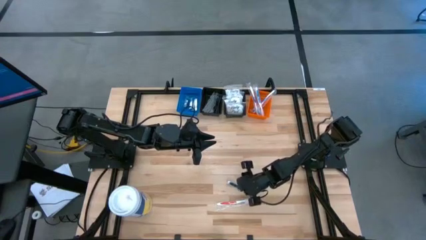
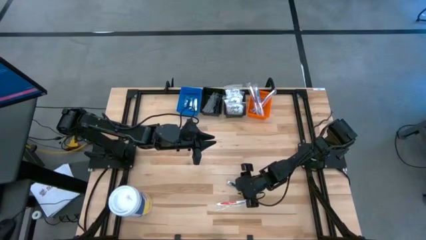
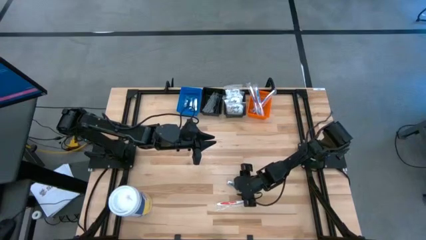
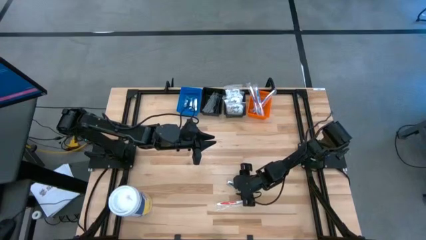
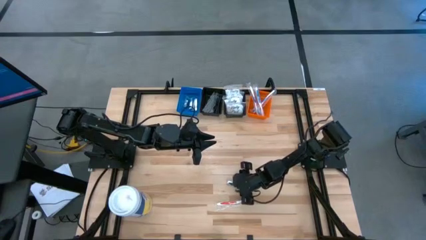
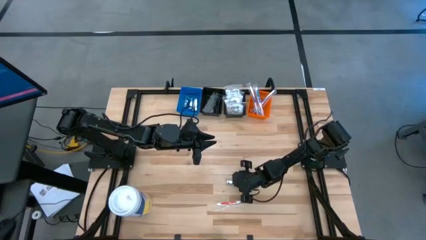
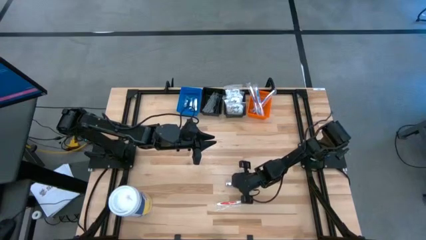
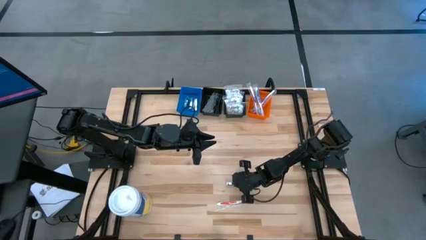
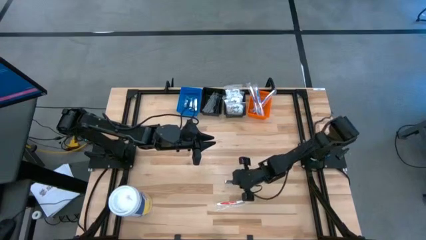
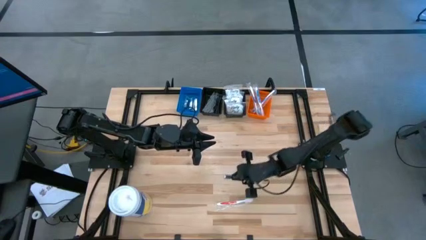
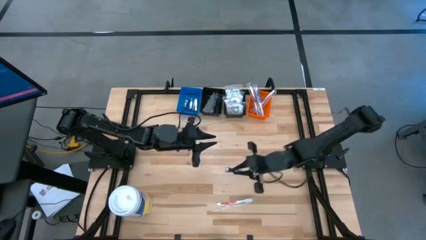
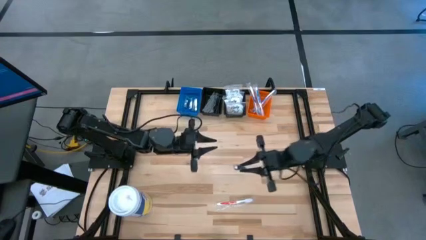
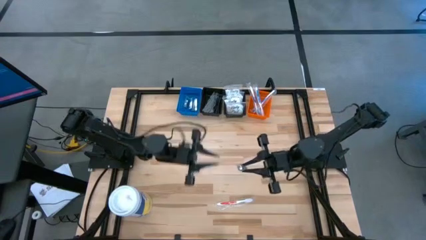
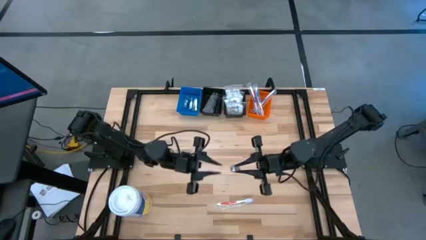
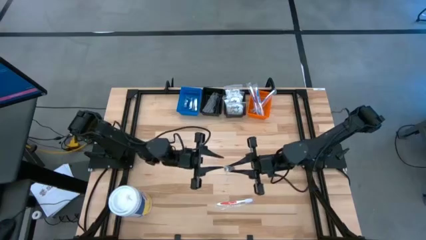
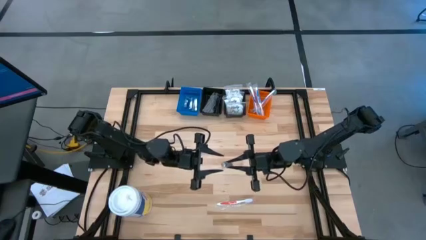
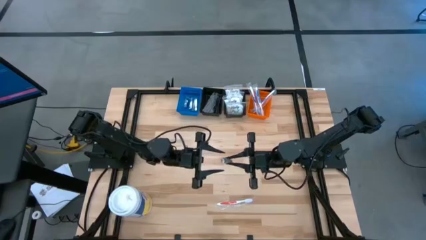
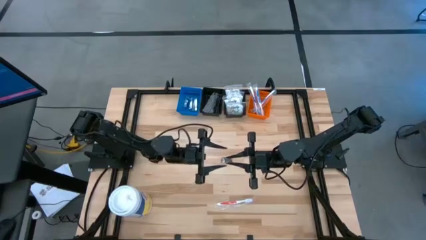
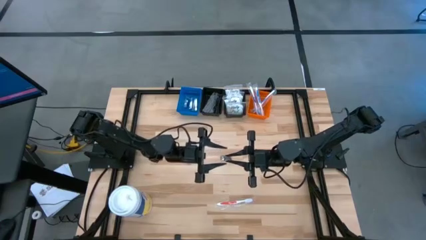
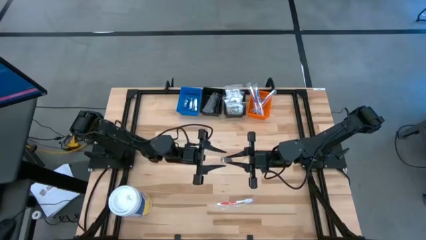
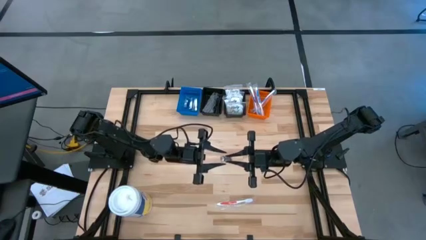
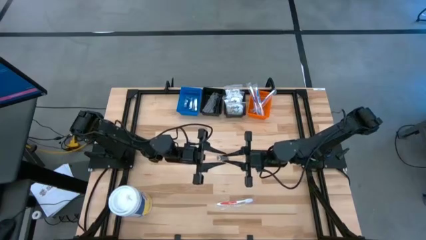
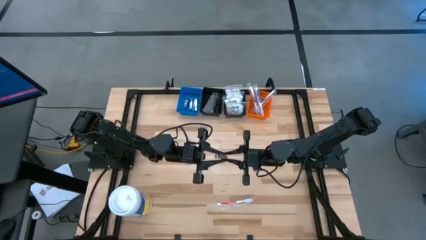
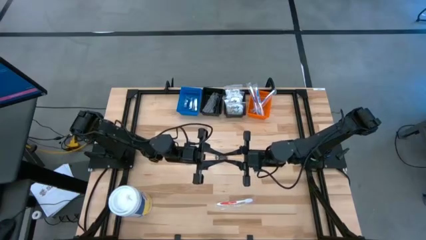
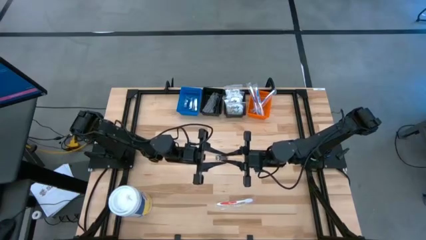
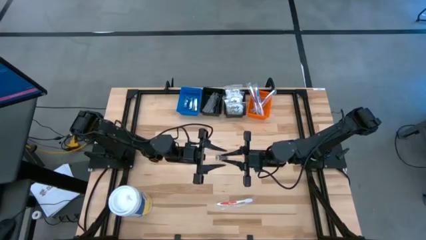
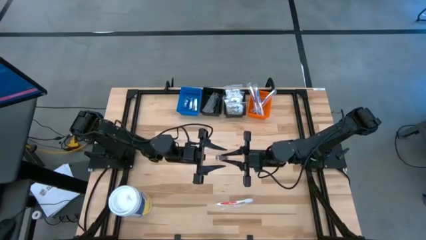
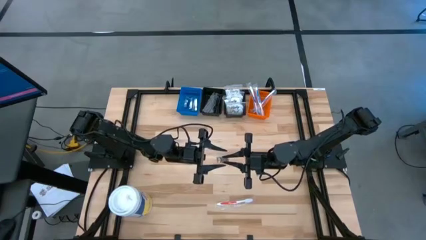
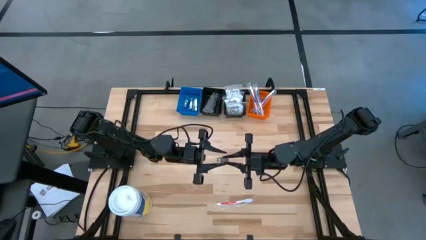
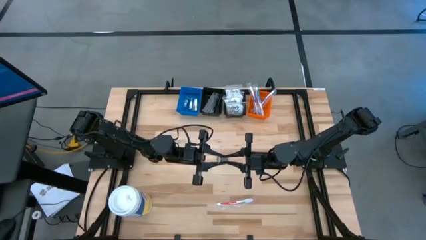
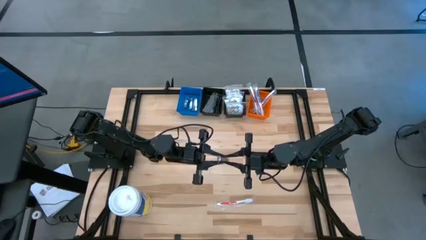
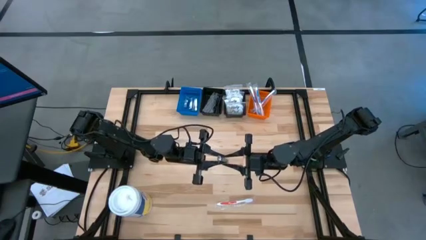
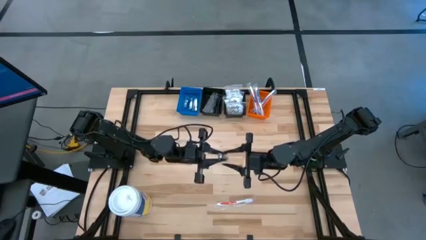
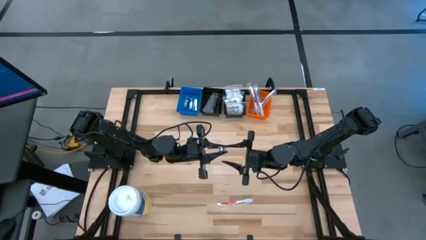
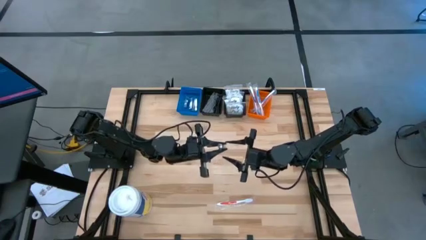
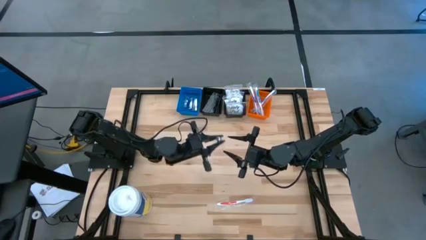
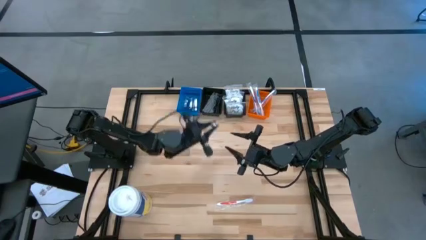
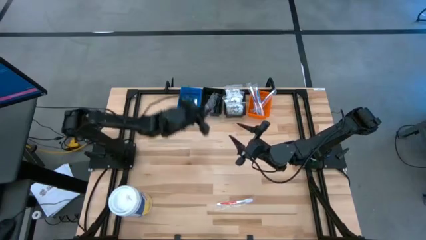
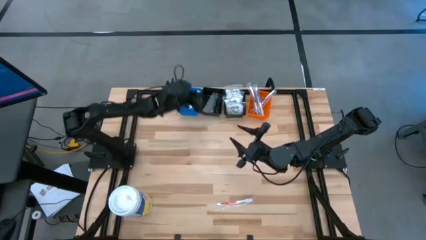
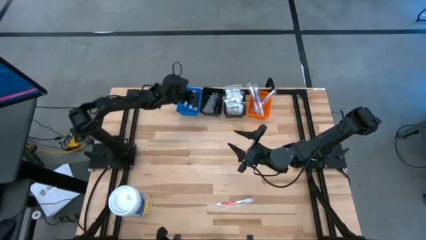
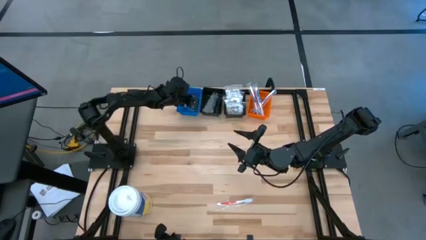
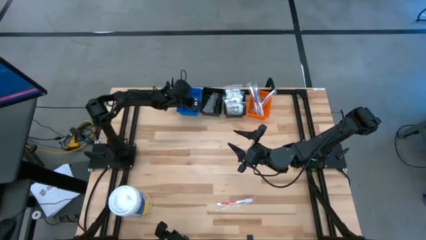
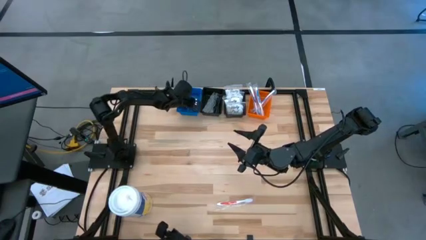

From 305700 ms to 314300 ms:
Task: Pick & Place Travel size toiletries
Put the silver nail cutter into the blue bin

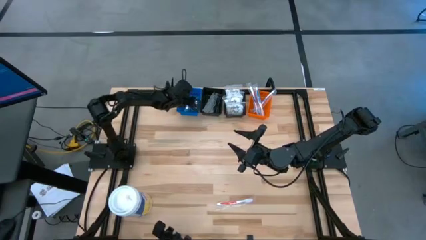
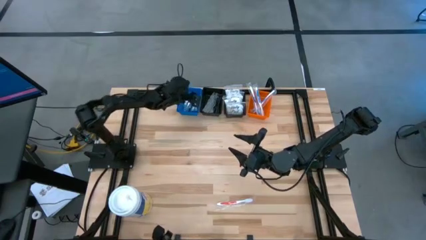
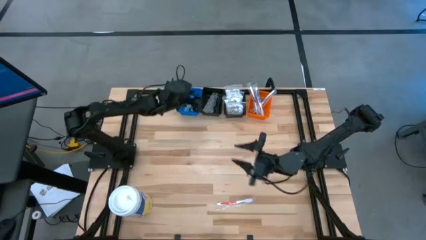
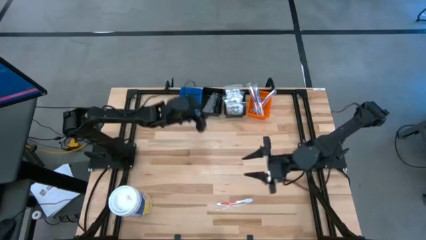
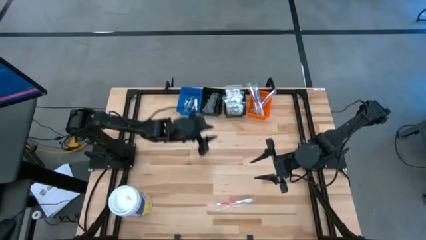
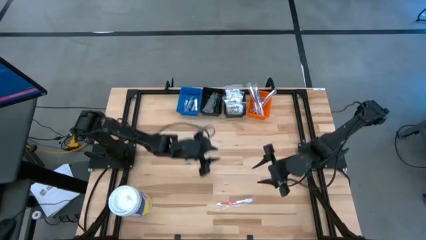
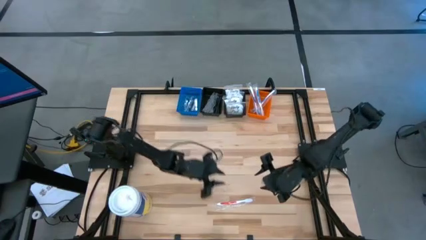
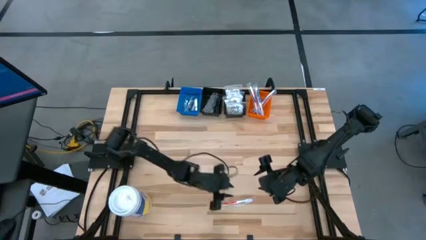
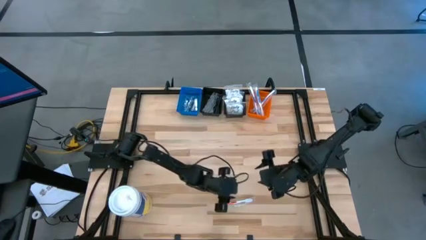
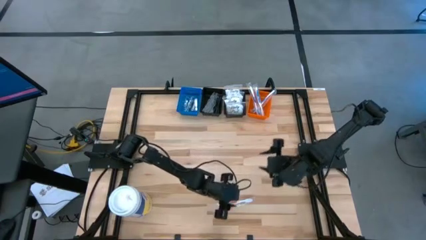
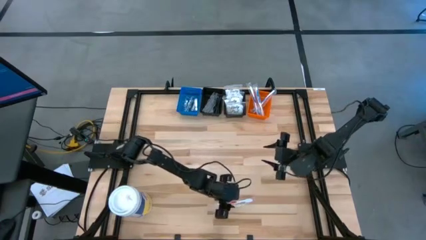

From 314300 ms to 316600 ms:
Put the orange toothbrush into the orange bin

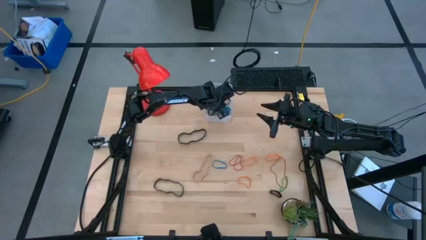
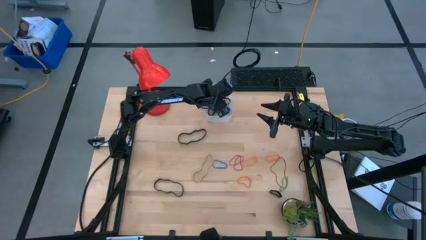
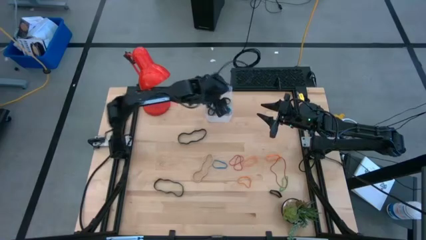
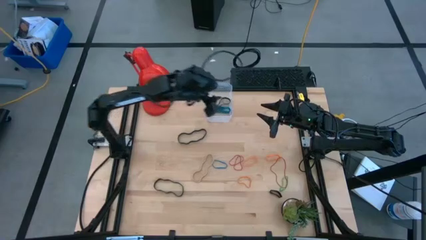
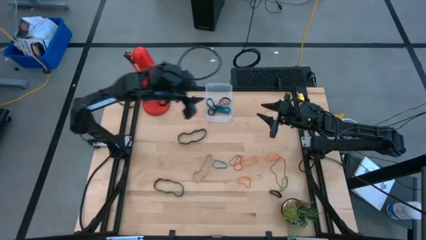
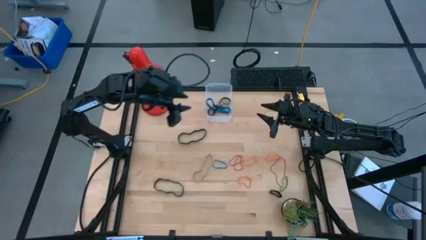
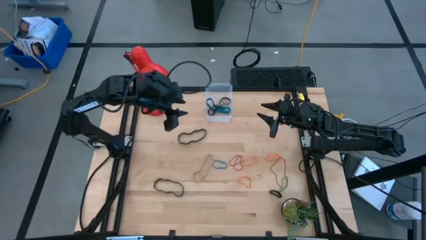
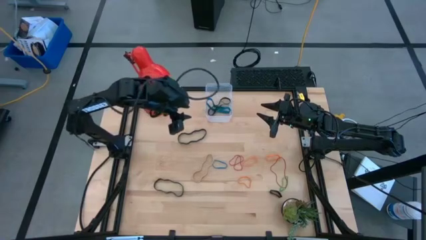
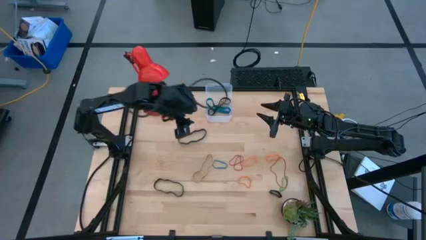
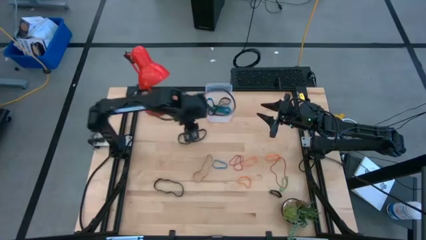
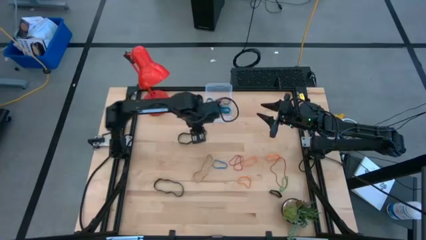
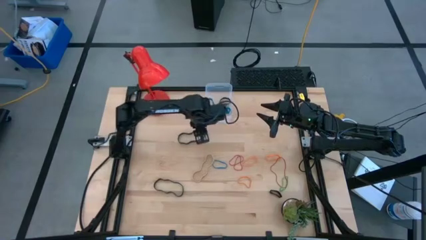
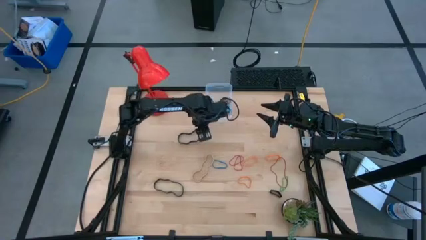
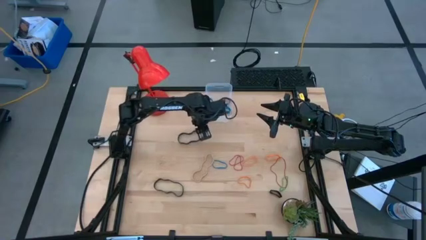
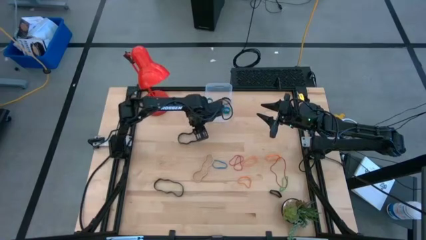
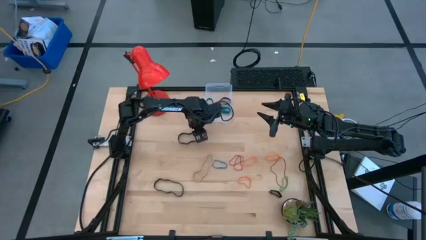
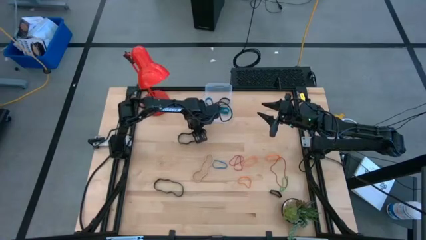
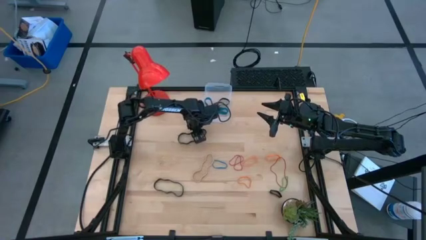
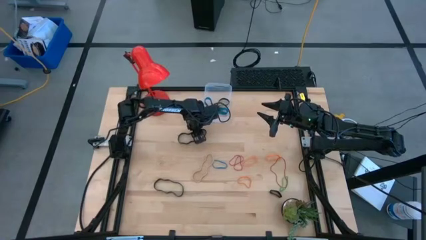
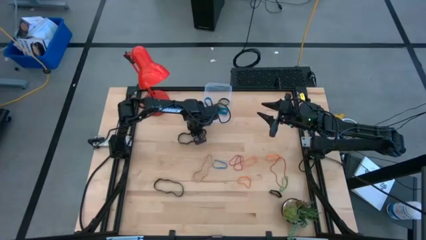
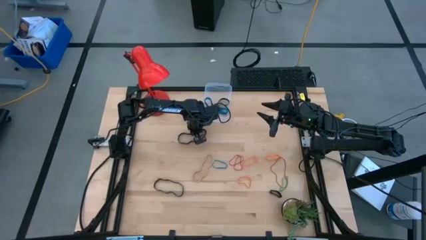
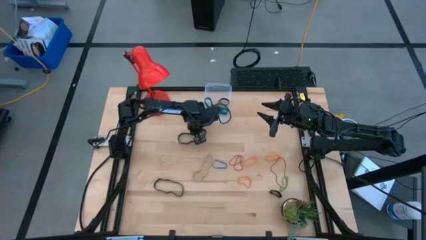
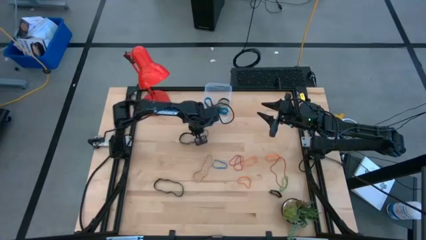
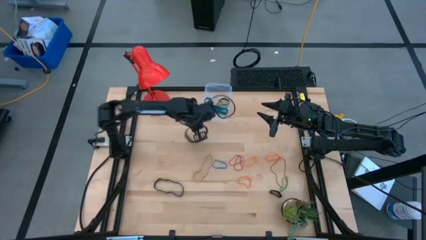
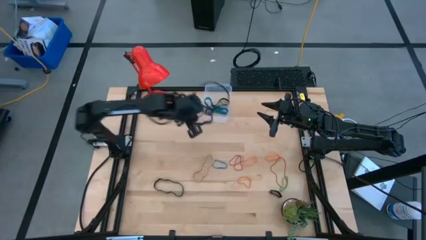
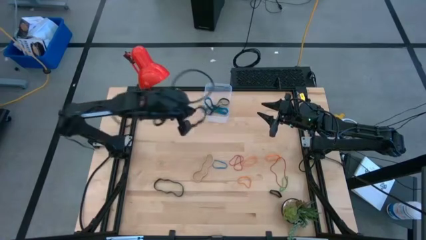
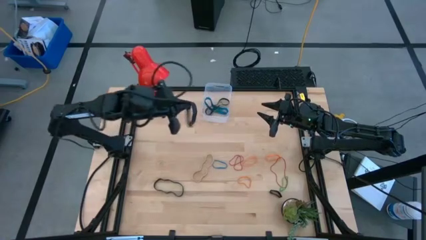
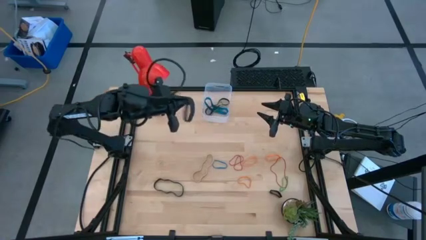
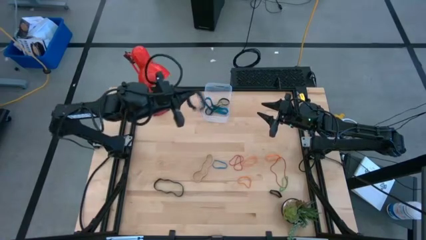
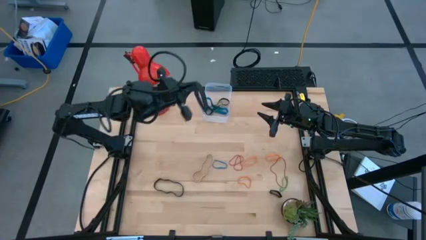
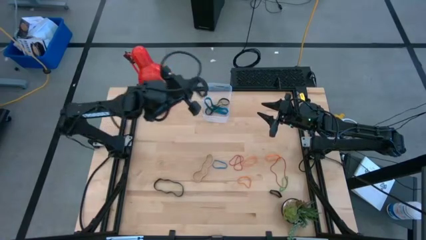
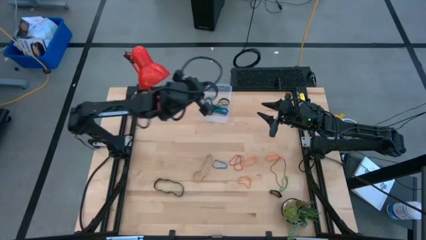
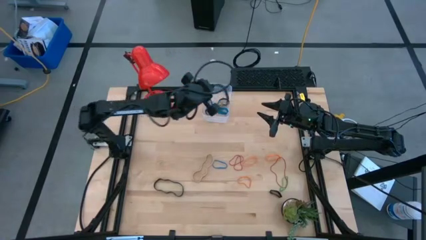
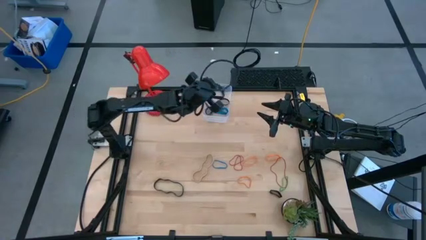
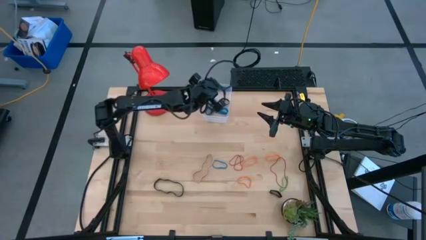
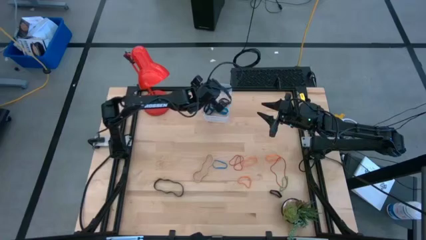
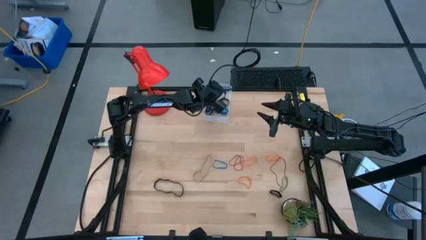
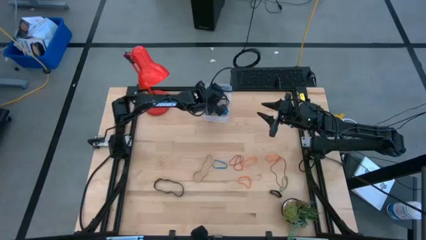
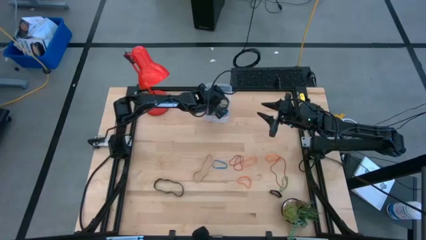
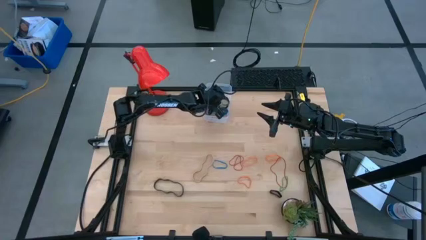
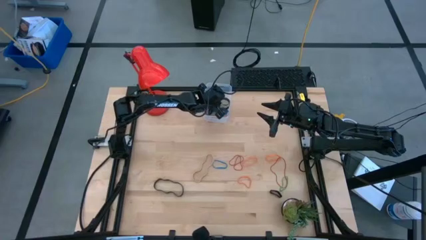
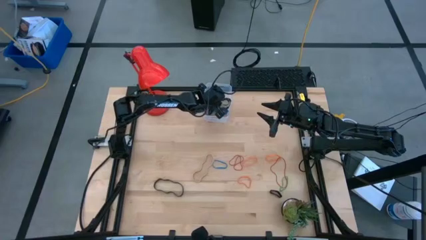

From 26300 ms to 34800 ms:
Task: Pick and place rubber bands into bin
Put the black rubber band into the transparent bin
